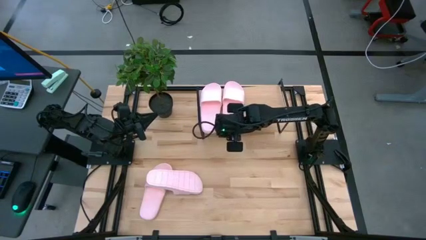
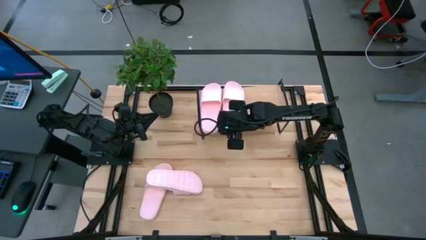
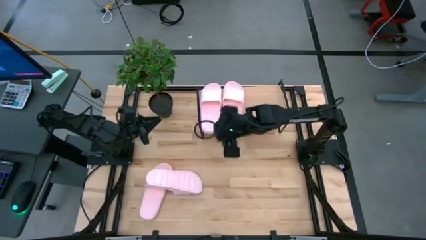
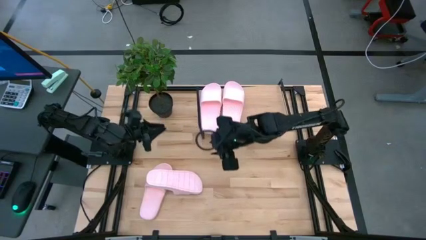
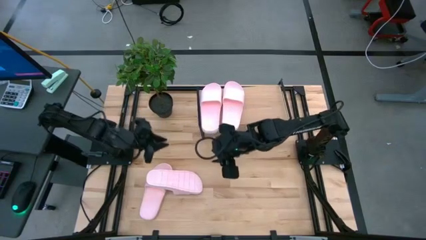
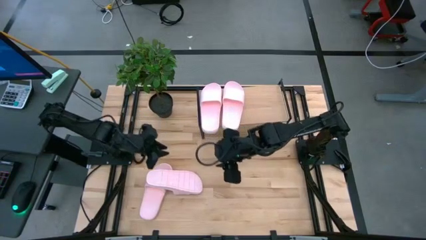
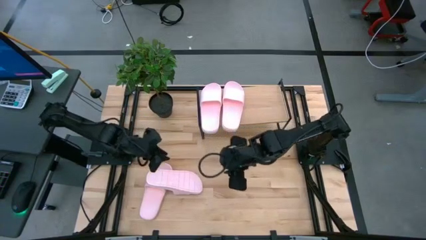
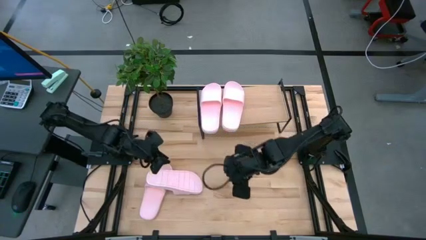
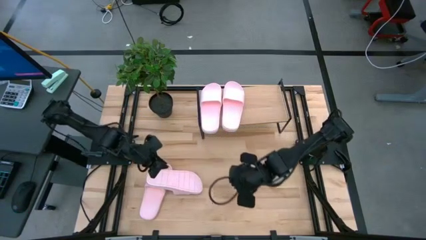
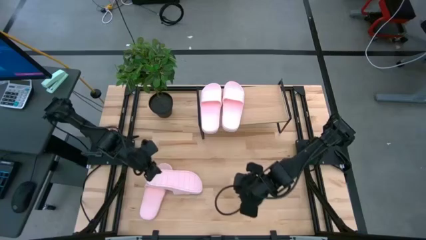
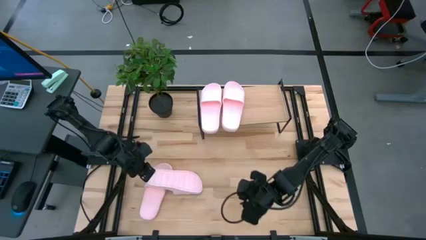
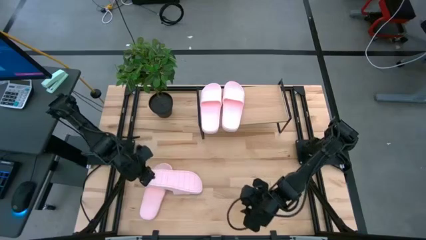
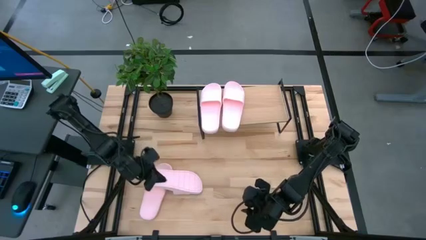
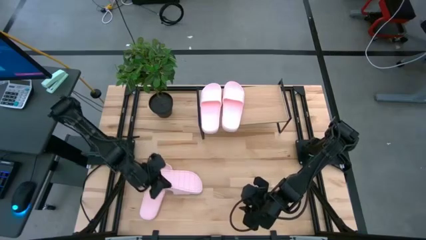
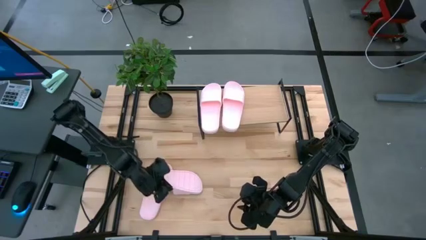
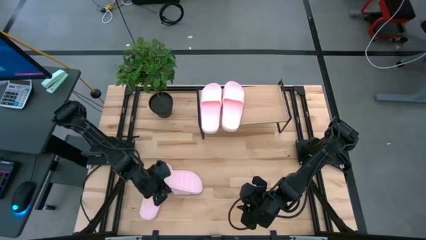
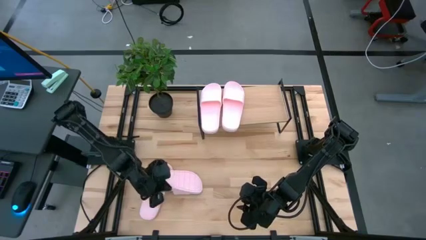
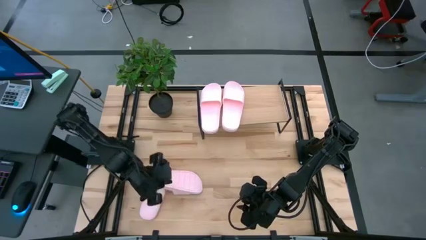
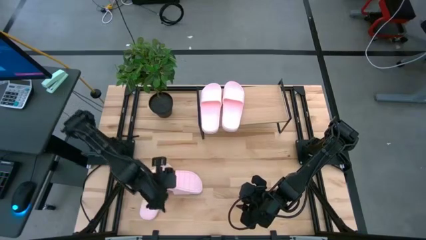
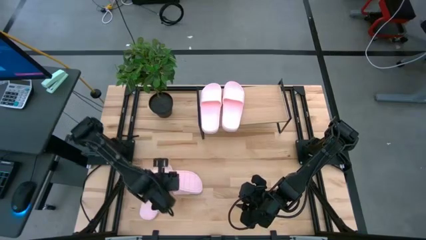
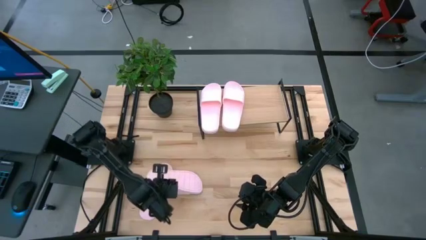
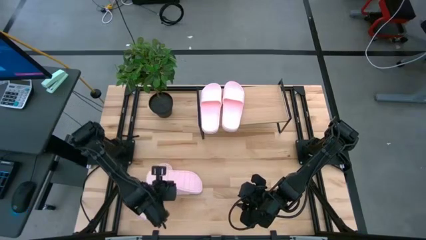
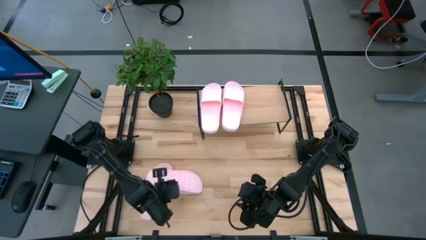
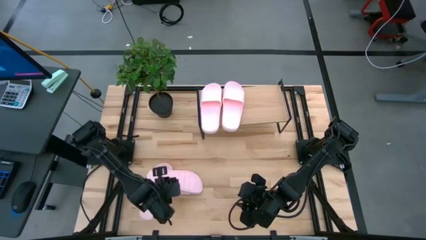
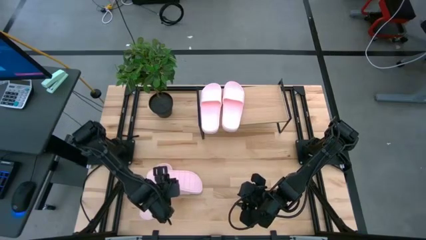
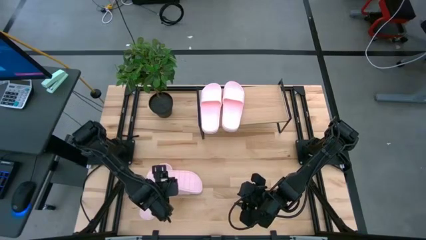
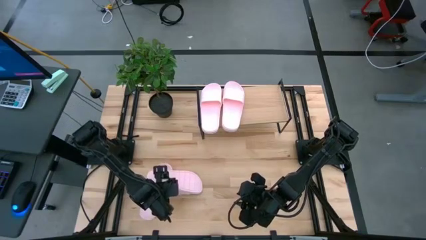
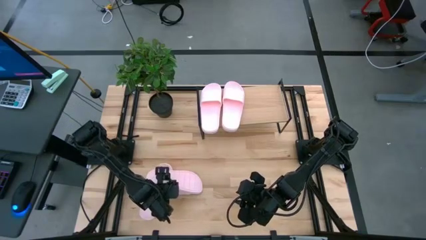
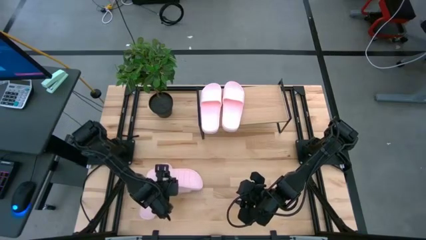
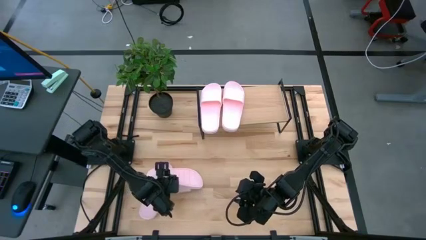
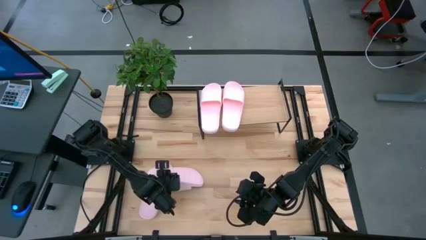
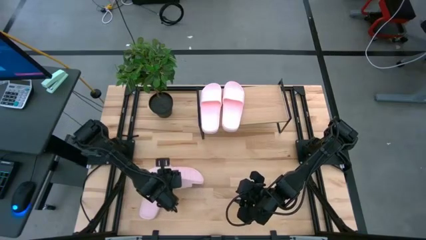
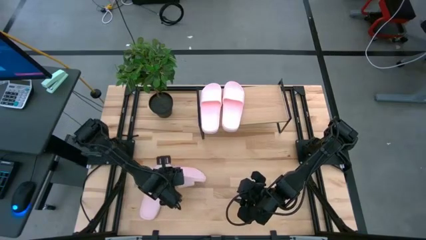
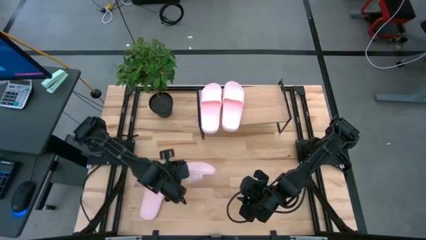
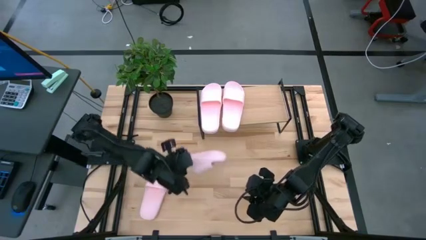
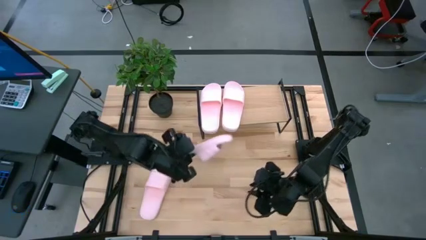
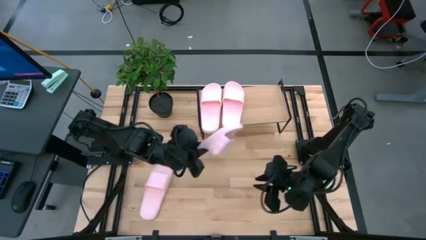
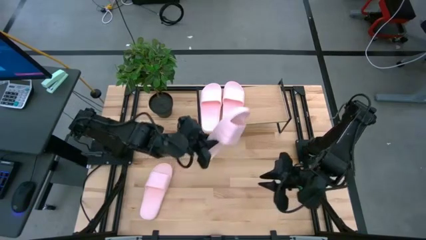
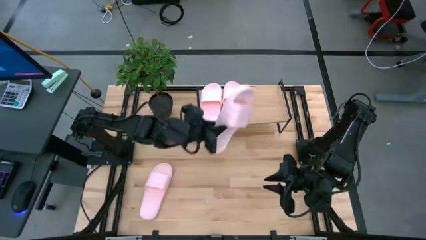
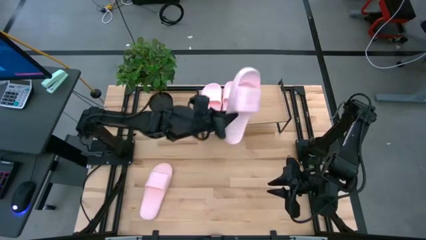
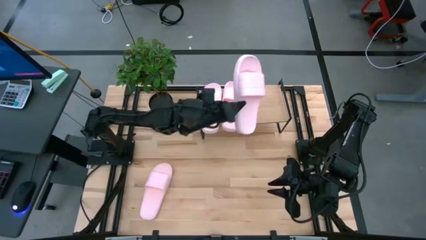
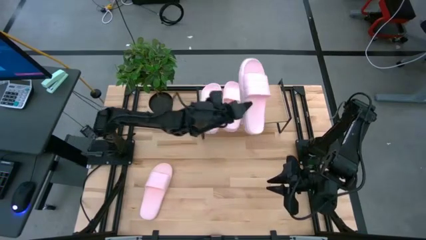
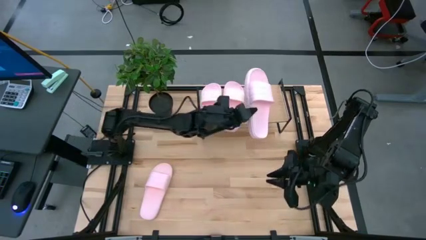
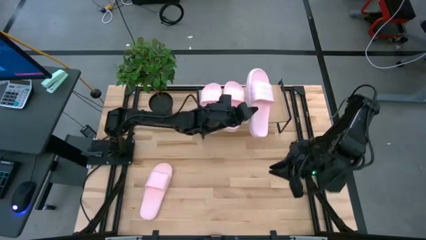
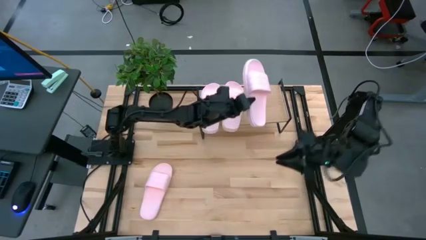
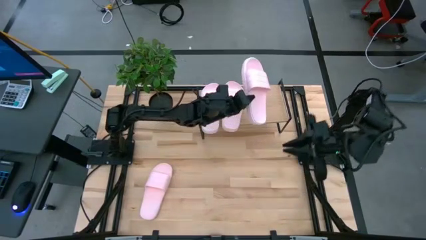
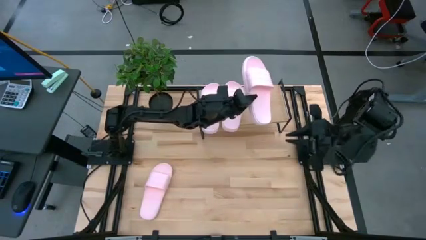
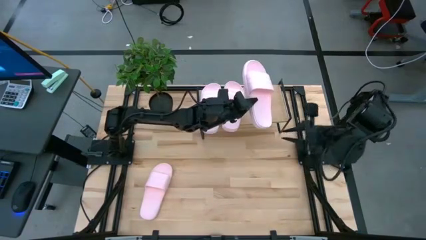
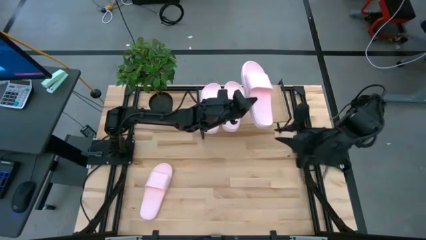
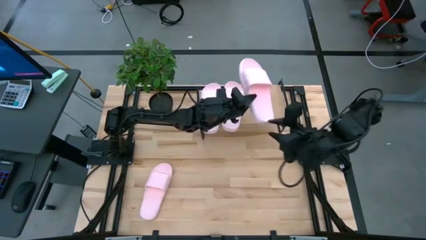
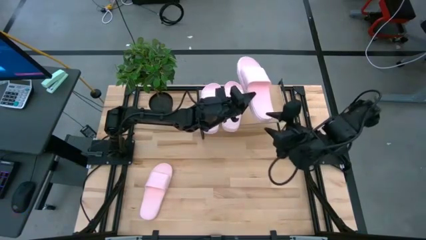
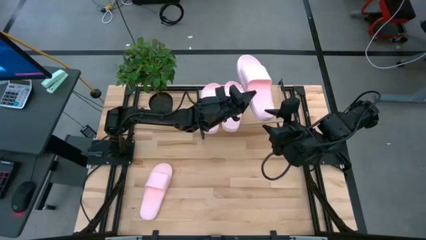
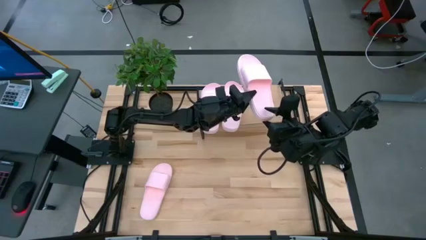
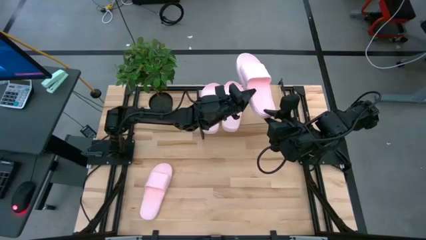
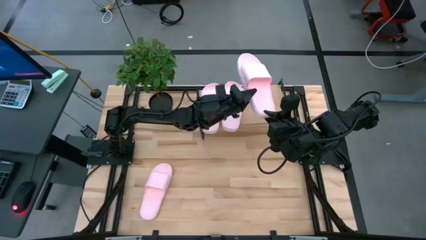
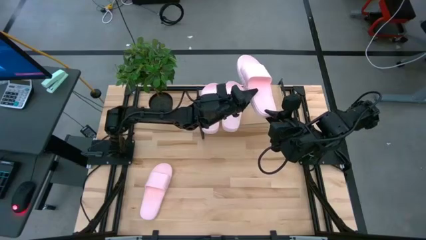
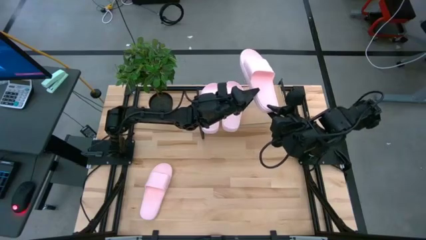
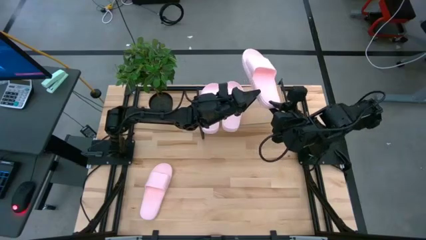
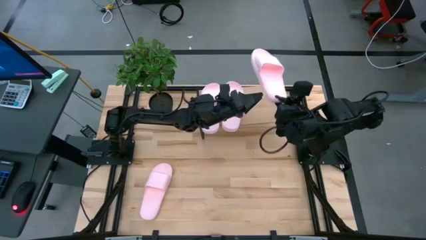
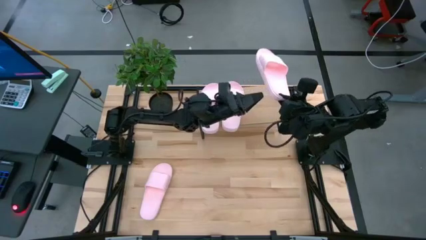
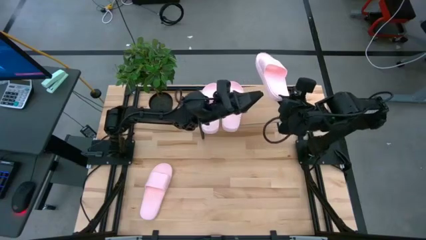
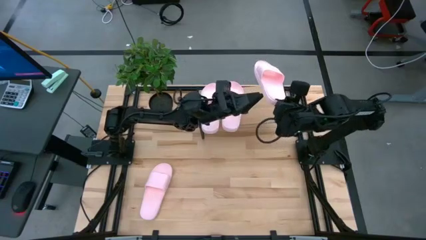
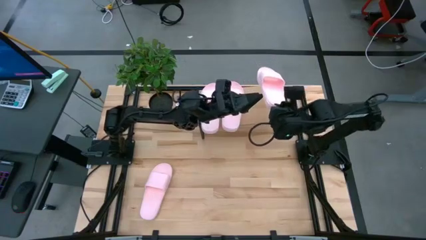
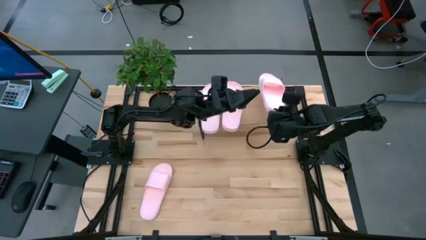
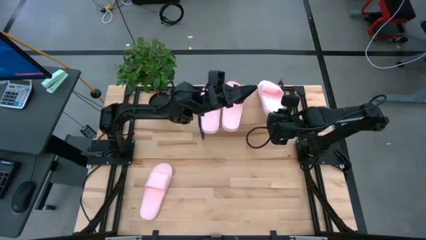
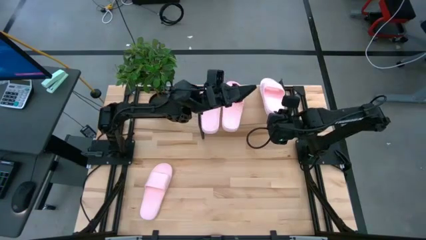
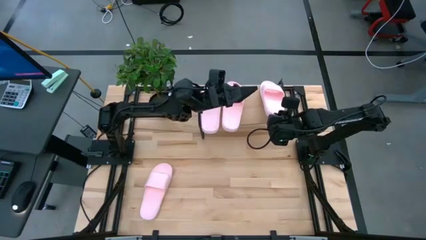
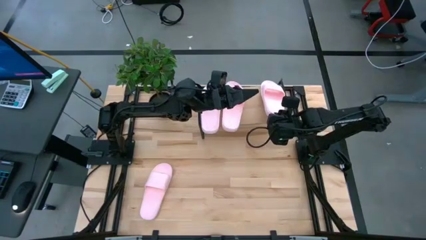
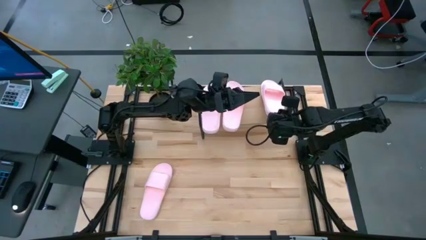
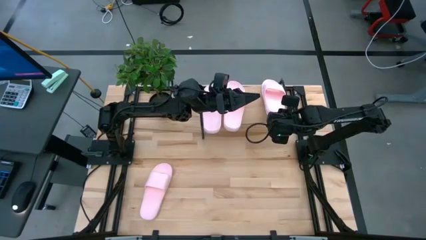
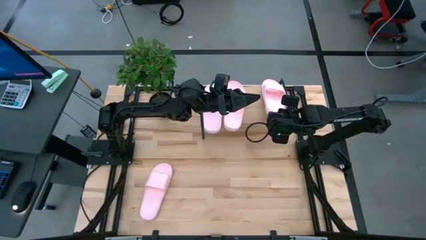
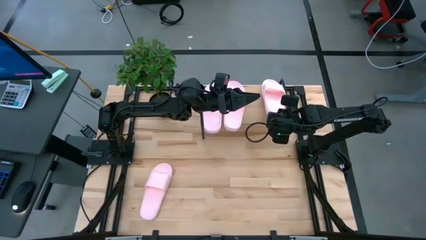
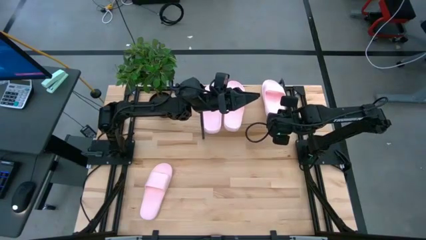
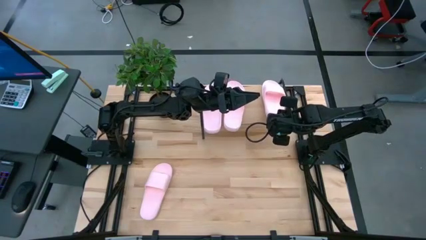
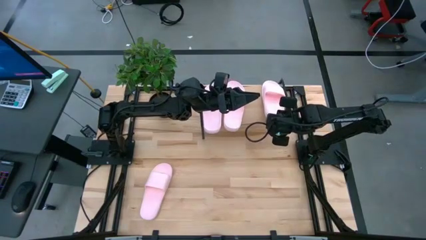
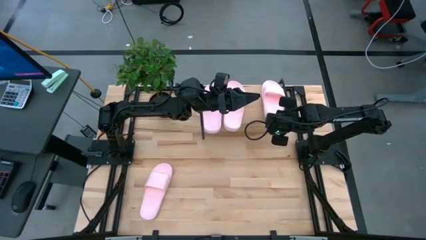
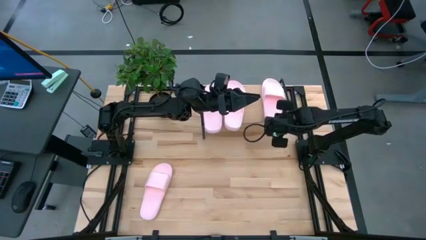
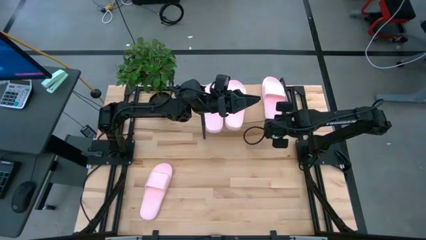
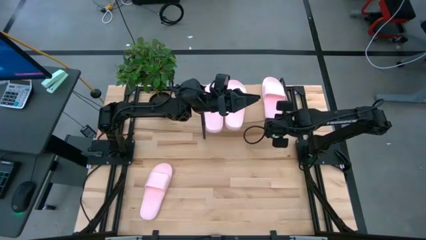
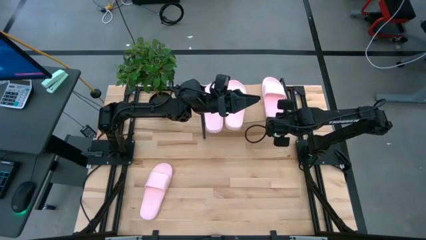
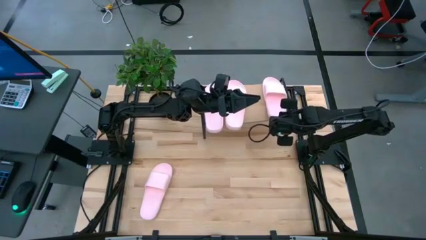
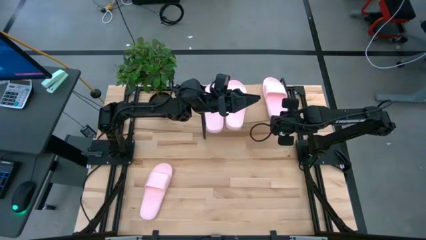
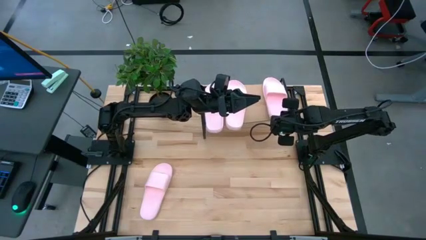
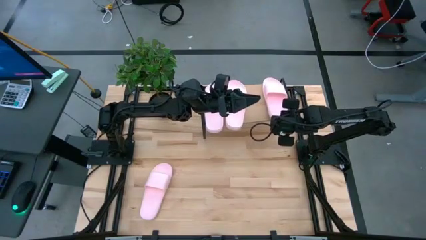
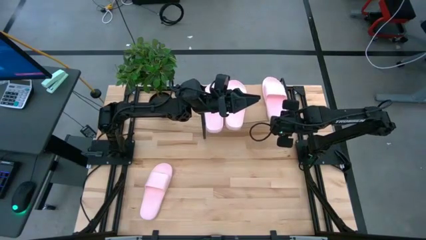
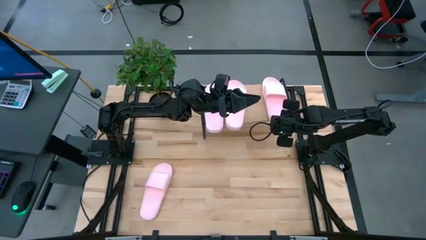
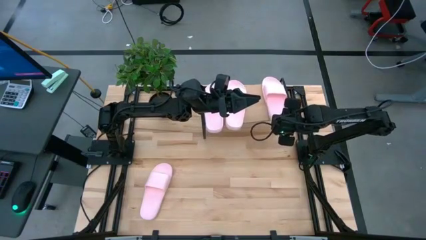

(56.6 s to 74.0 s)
Task: Pick and place slides into the shelf
Put the right pink slide on the shelf
